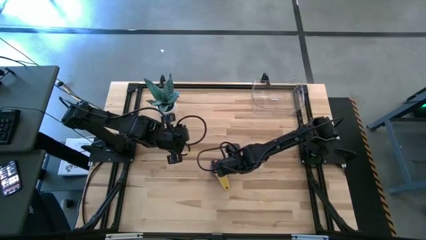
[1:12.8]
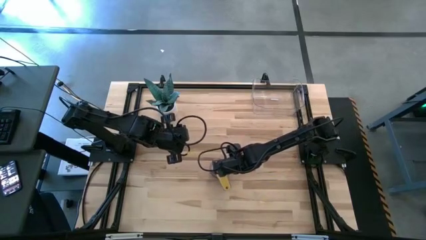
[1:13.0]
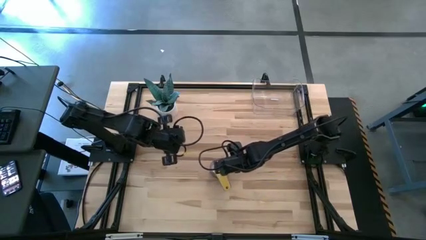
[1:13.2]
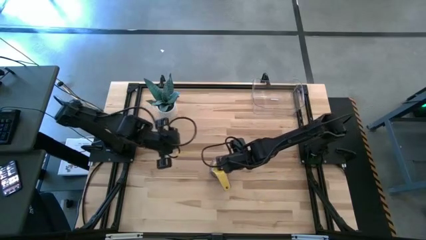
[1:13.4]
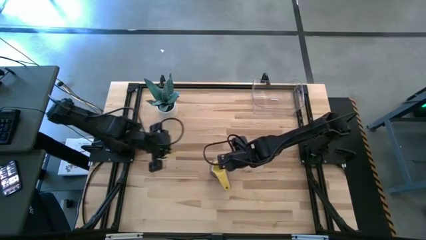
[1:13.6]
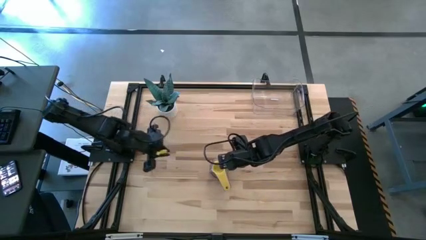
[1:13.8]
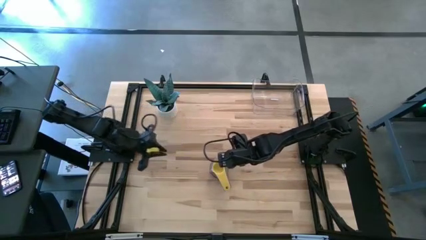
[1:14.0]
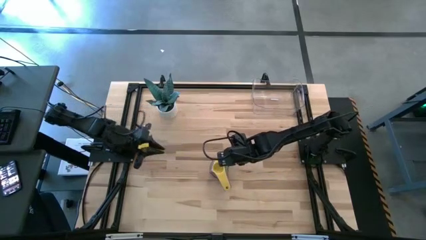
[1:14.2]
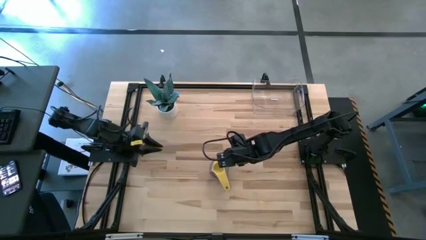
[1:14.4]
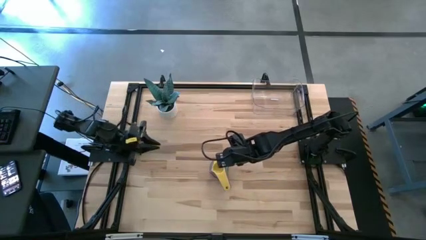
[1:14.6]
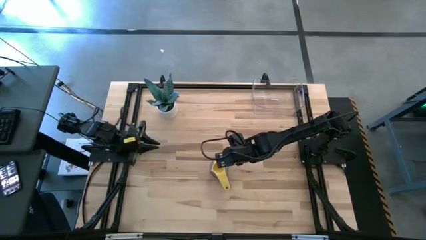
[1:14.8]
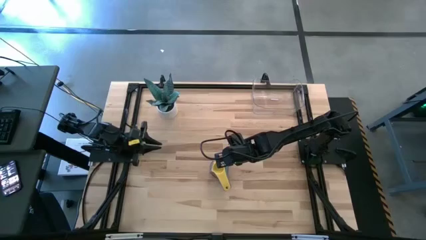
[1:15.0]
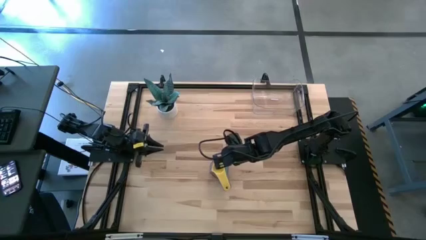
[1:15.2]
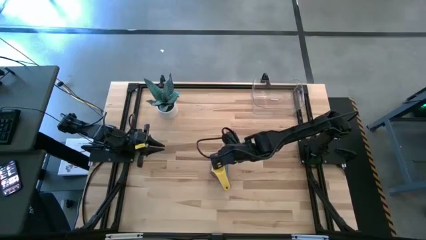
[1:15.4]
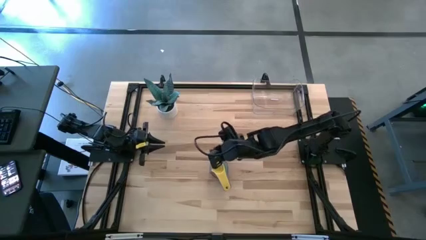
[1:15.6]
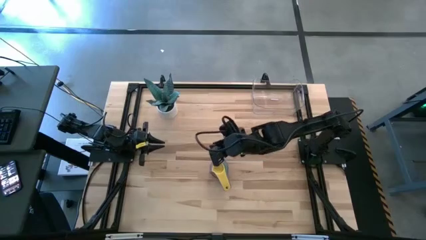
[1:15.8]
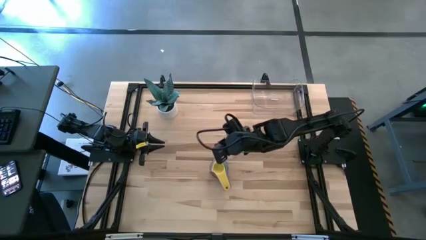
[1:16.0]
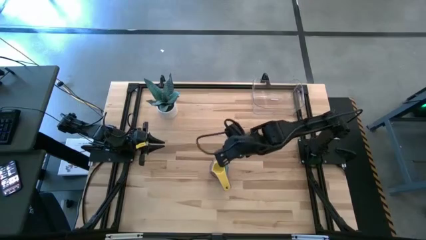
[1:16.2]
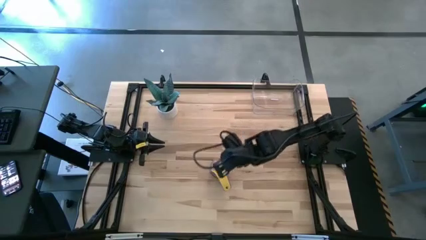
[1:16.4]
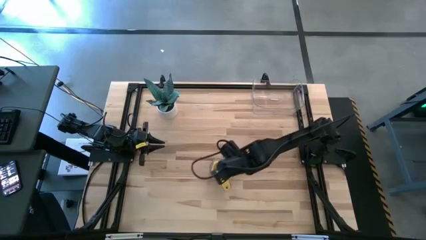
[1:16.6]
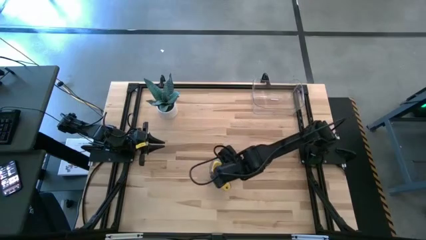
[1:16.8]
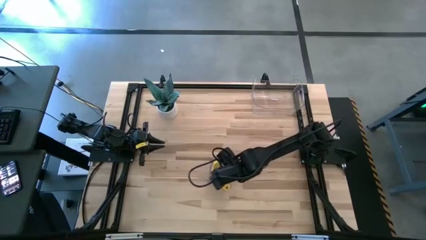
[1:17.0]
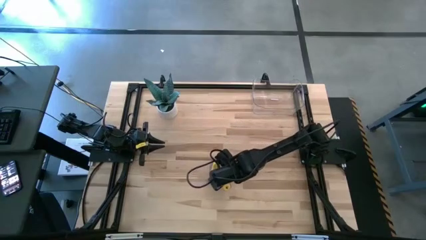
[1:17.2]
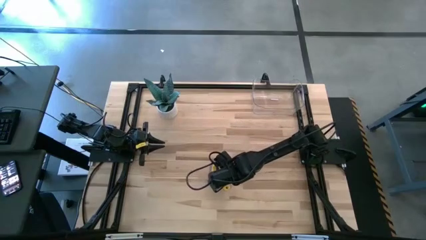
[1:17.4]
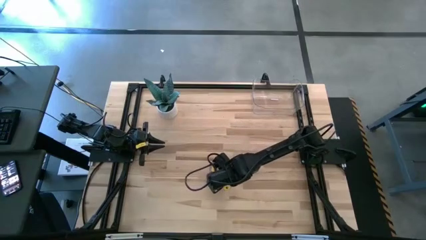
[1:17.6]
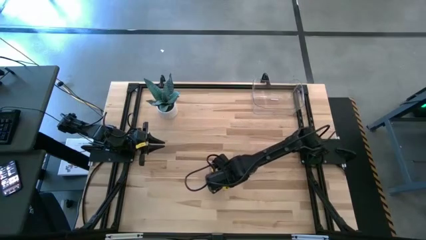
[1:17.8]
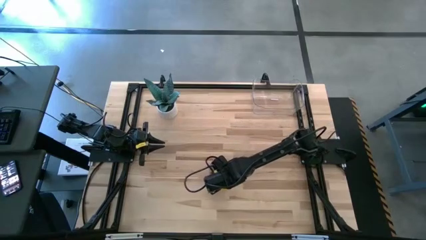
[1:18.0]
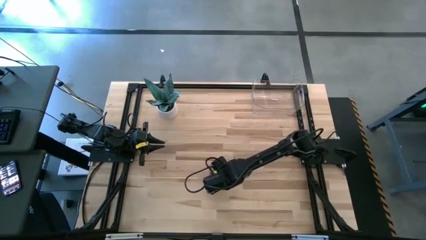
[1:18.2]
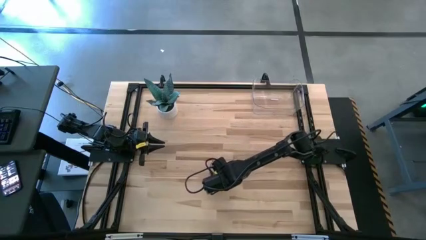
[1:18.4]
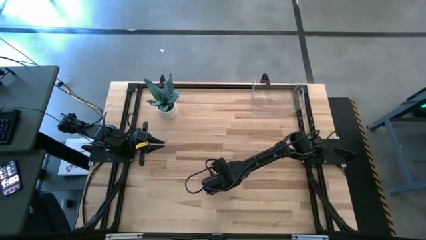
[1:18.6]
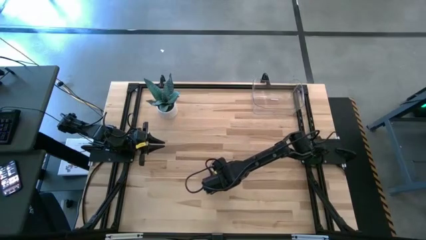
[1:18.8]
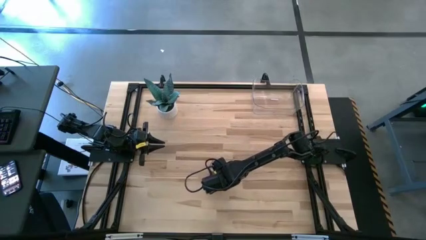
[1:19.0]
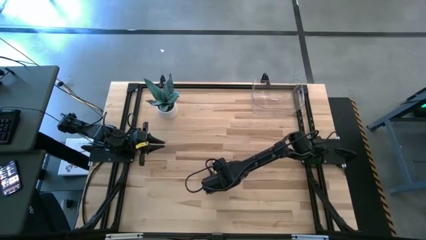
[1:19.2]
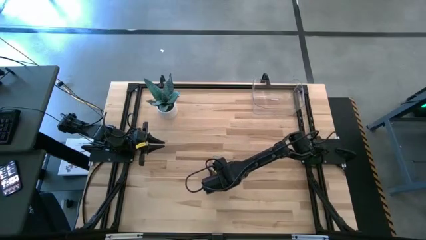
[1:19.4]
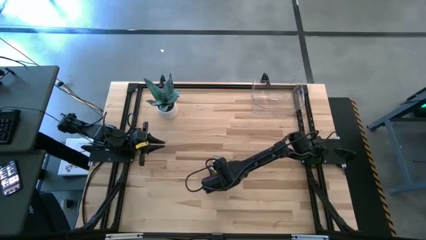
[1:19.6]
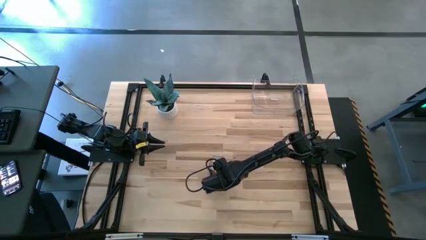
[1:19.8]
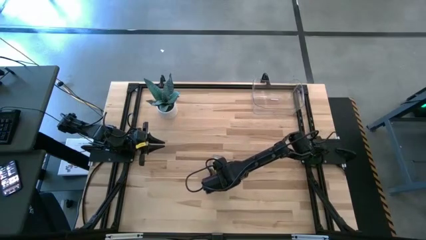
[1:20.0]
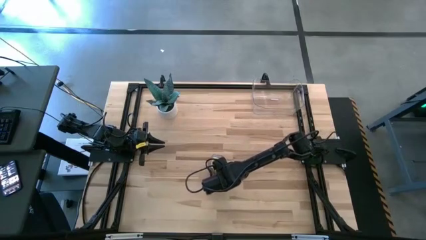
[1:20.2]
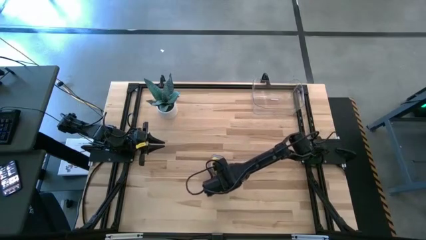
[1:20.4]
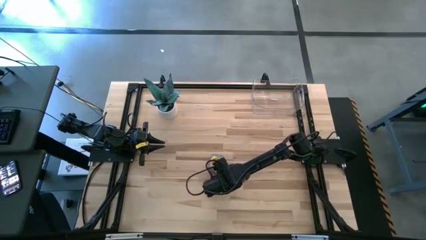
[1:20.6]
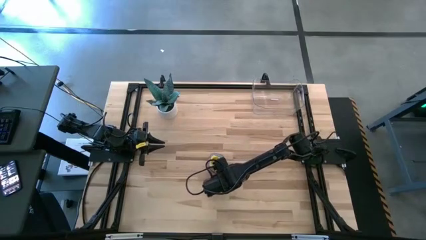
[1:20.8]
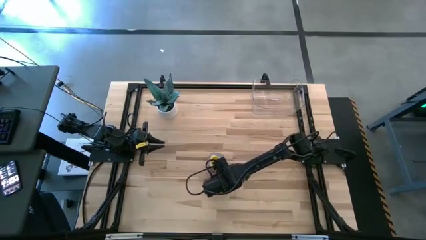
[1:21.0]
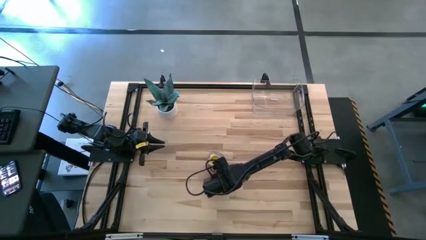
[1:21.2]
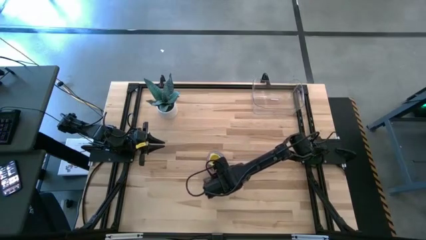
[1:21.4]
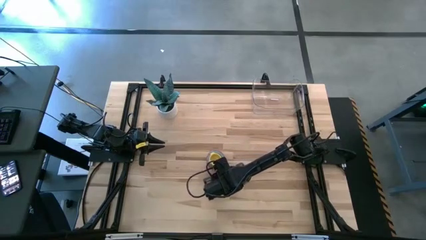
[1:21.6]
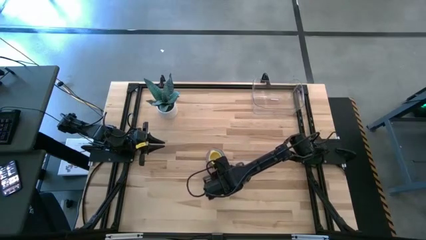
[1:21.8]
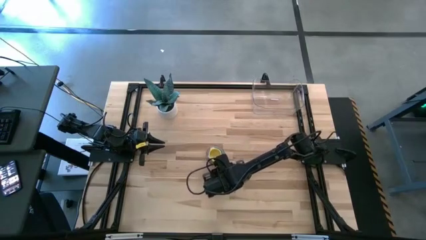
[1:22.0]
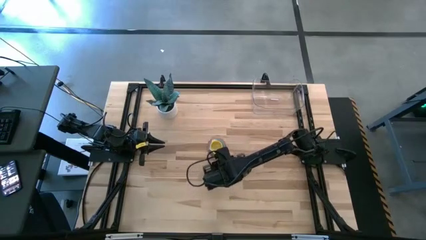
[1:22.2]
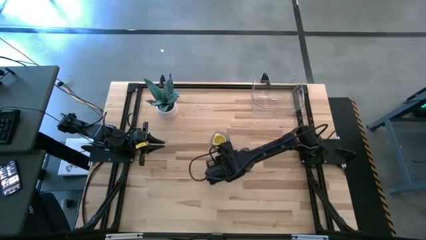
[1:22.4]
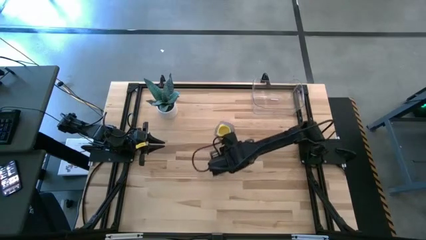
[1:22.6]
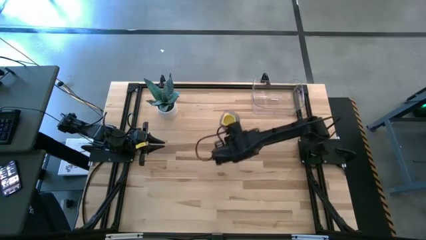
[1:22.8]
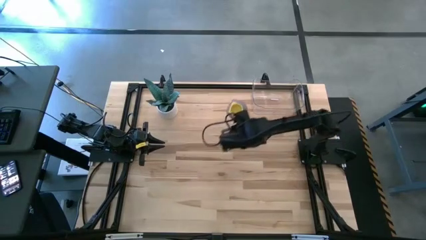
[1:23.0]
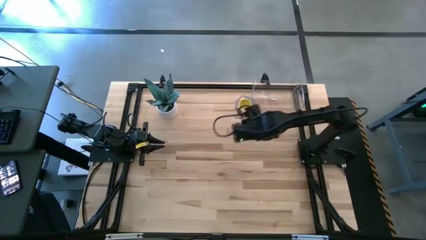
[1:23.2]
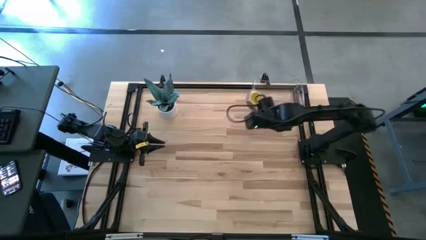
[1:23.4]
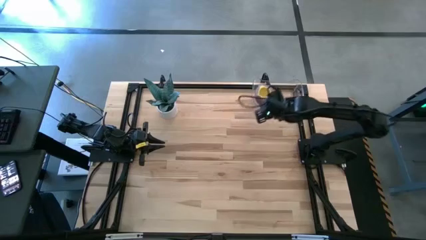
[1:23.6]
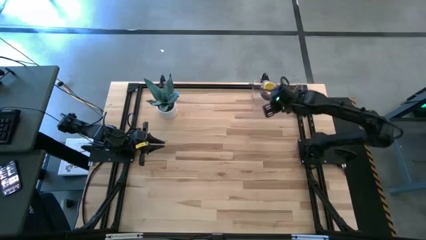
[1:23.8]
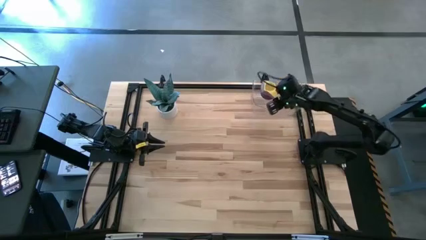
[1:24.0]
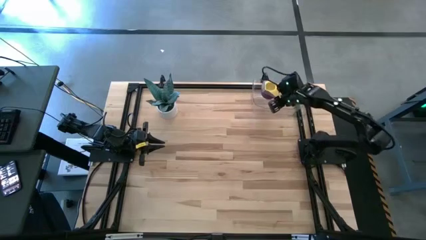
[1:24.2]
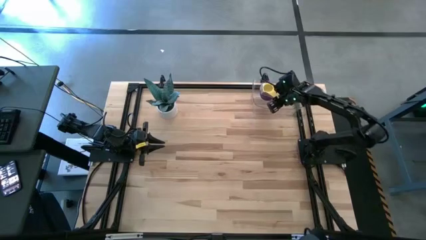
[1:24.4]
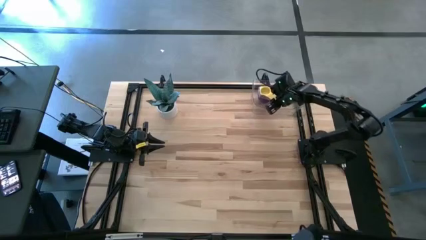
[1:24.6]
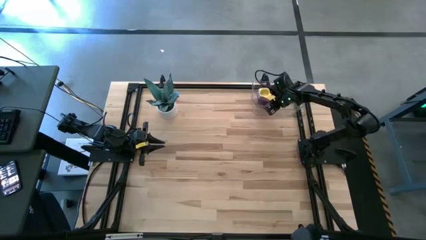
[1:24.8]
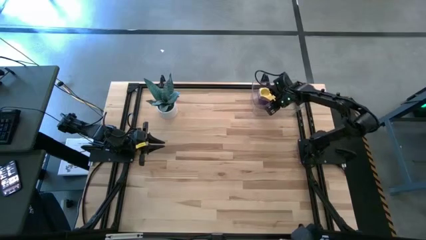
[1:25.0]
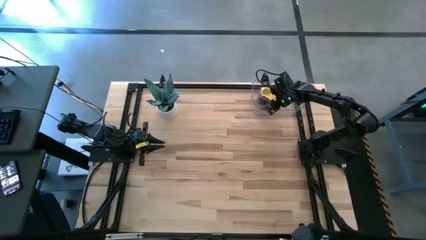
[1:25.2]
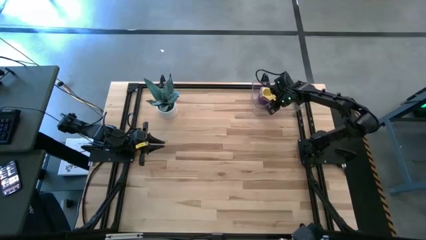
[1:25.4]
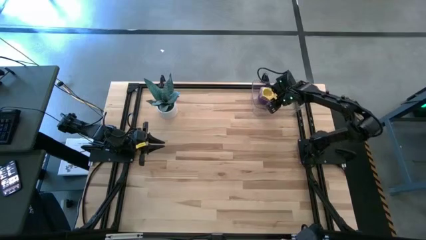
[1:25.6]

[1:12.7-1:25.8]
Task: Nest measuring cups in basket
Put the nested measuring cups into the transparent bin

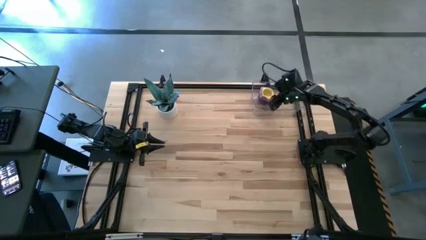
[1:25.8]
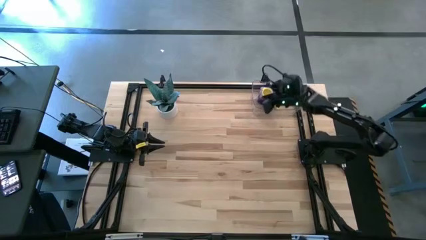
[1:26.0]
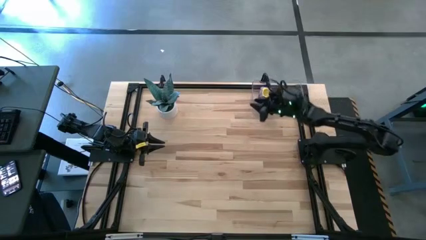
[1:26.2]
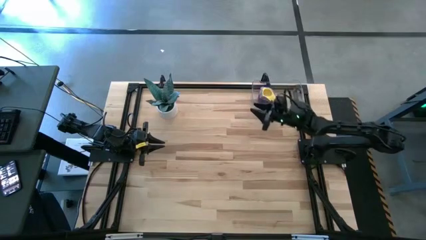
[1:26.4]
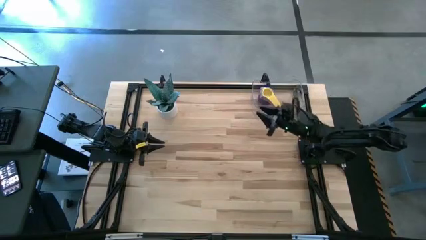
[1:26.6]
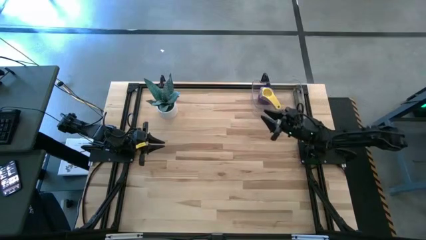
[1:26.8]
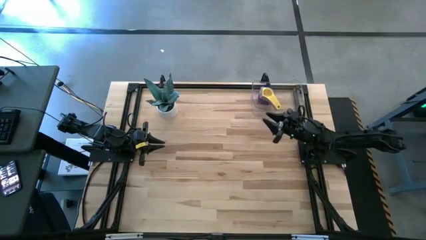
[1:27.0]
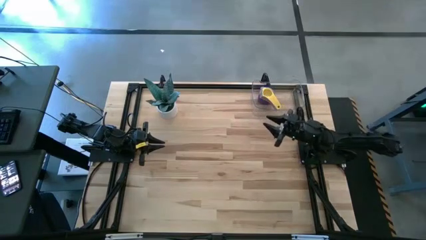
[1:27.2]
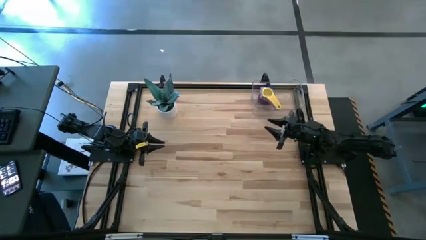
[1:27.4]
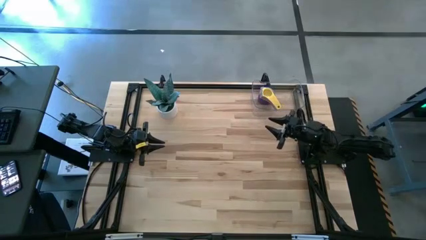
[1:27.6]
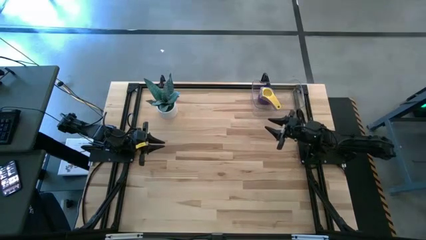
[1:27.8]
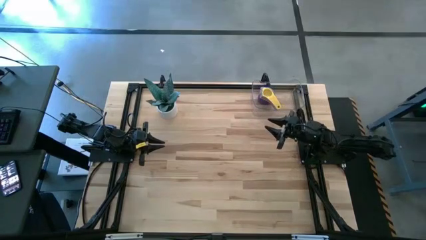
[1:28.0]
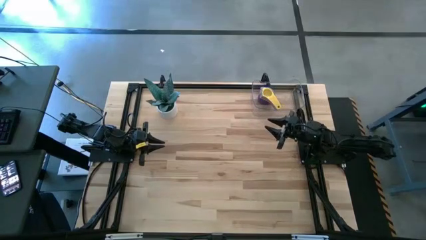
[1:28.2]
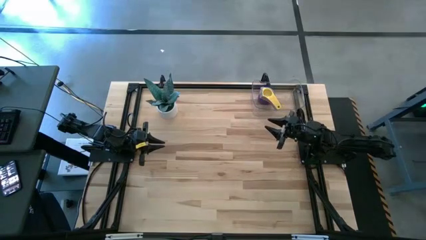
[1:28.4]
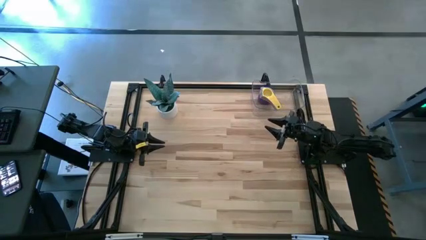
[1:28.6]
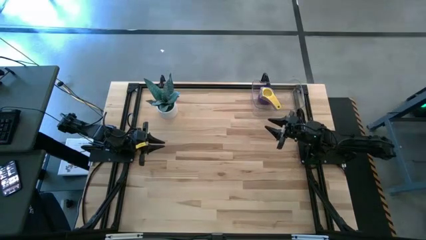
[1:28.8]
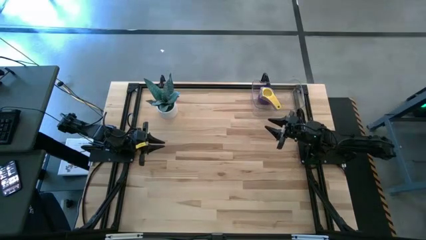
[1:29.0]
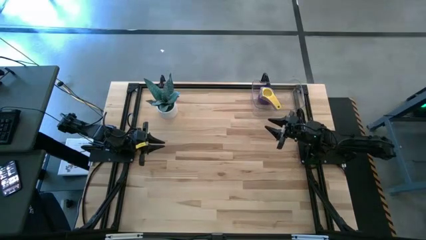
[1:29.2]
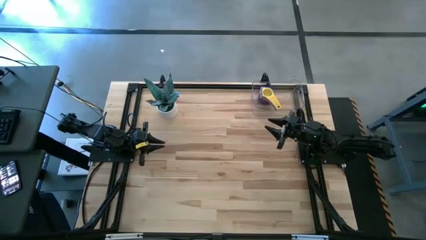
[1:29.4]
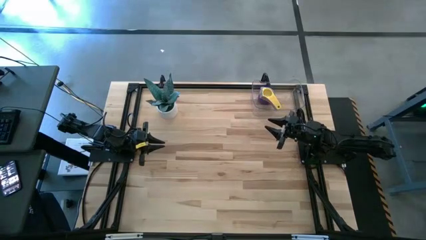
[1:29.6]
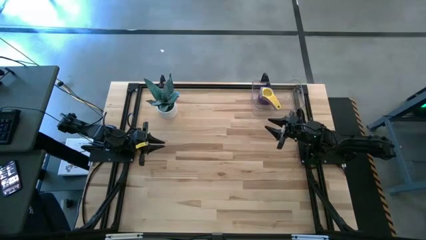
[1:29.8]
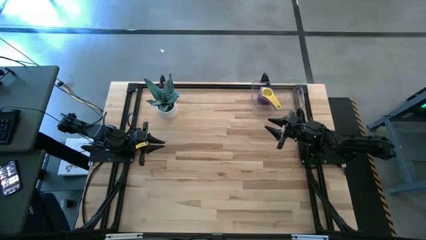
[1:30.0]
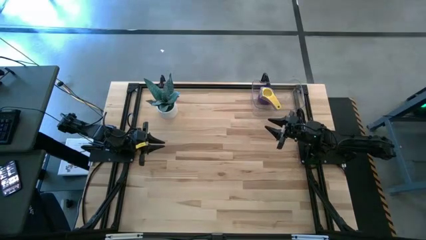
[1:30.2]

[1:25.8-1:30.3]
Return to Home Position
